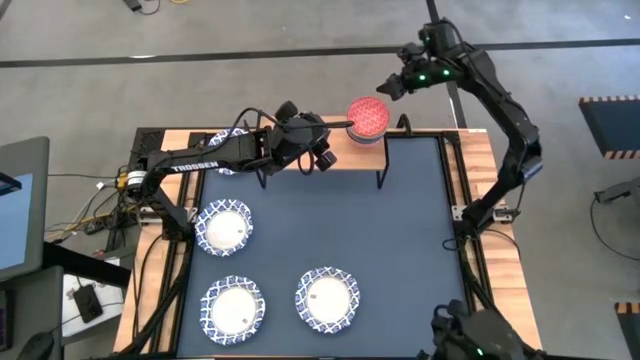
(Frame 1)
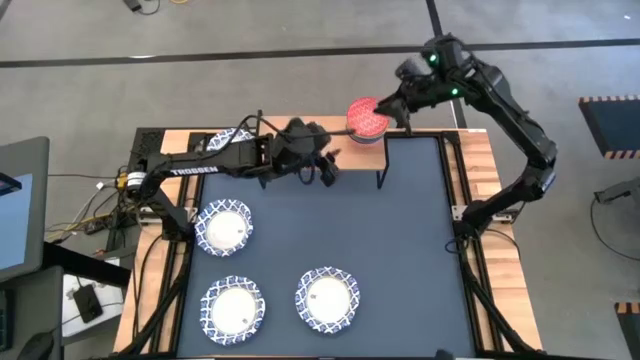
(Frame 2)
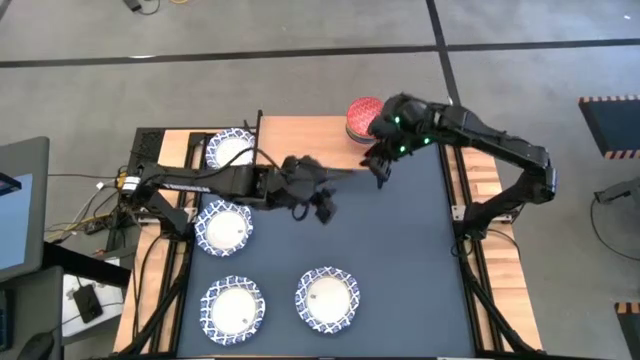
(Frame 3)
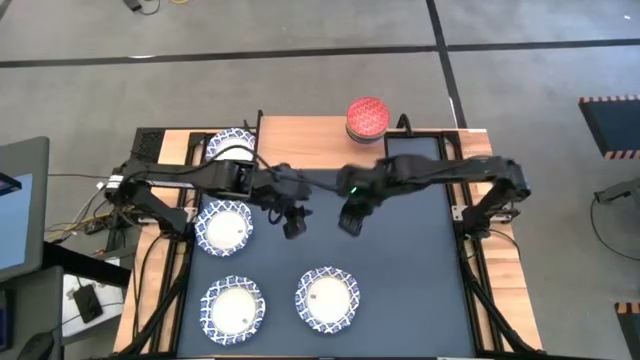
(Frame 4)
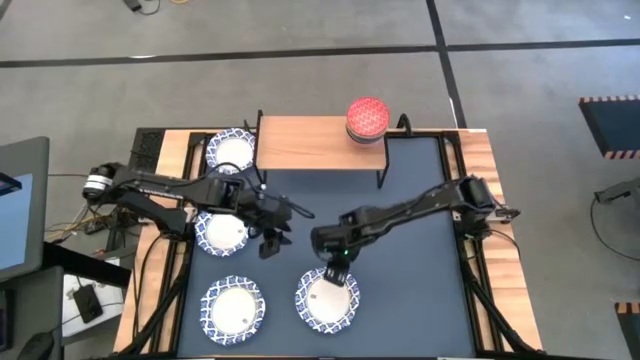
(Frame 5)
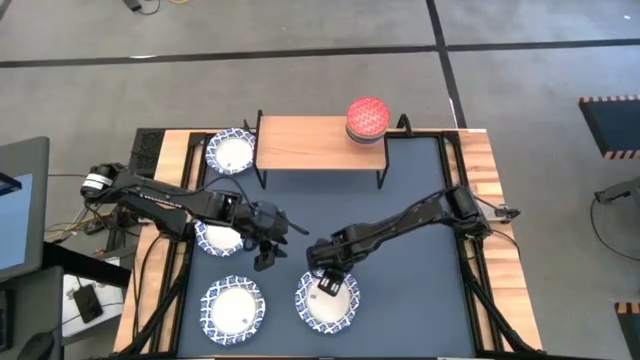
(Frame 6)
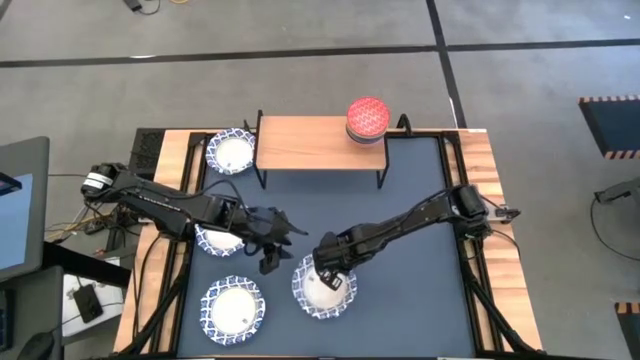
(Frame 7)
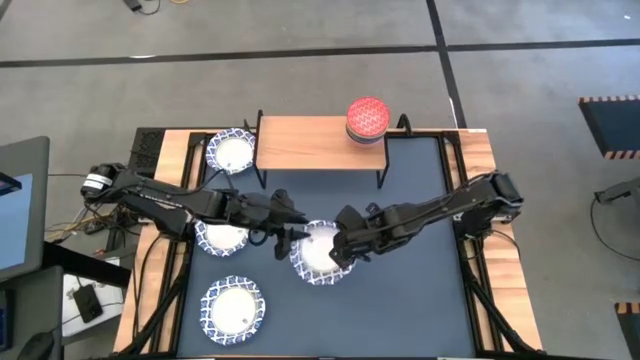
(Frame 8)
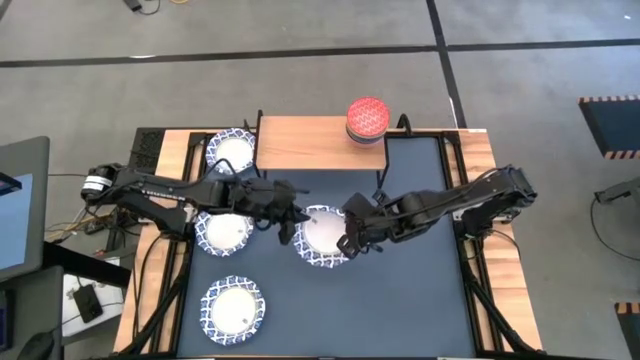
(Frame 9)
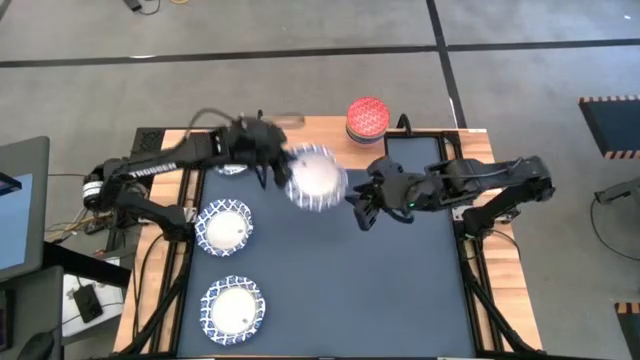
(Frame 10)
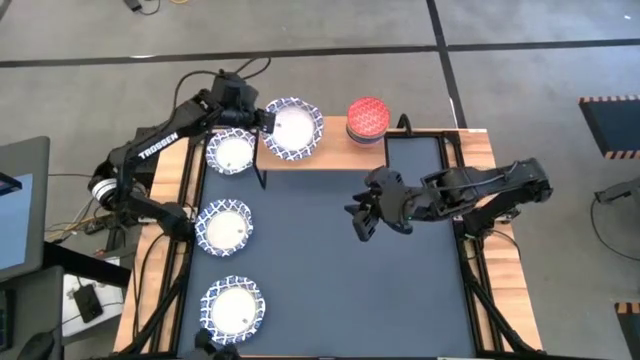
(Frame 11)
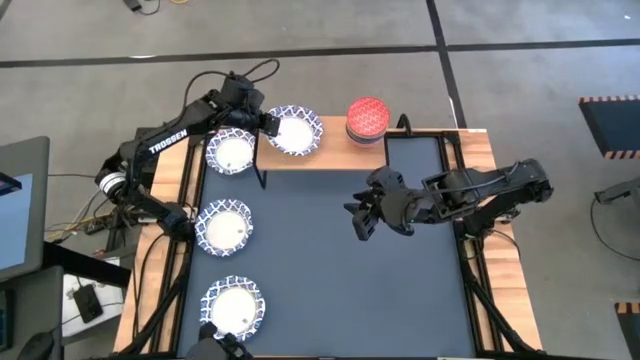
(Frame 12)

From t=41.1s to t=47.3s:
Task: Place and stack bowls onto a shelf
Put the white bowl on the shelf

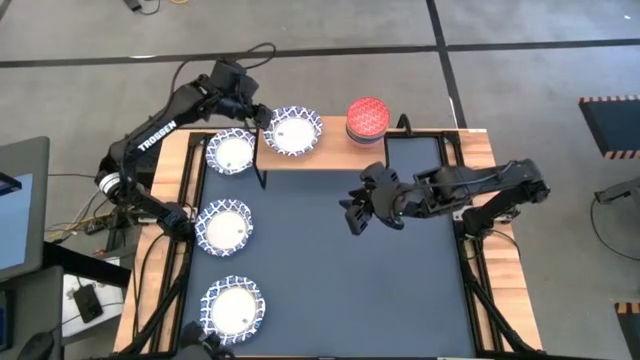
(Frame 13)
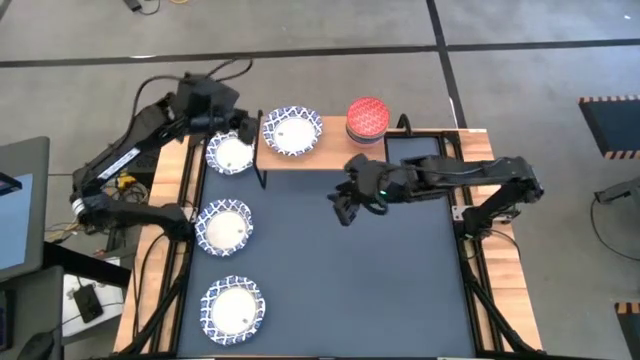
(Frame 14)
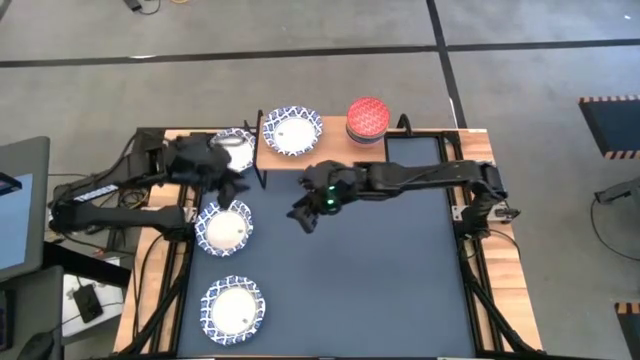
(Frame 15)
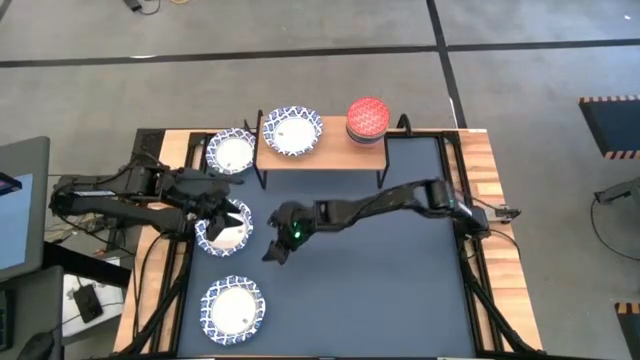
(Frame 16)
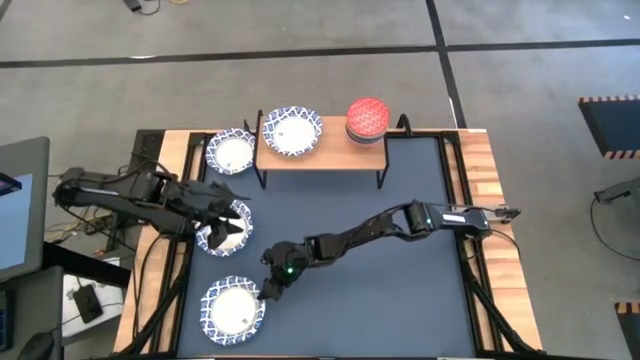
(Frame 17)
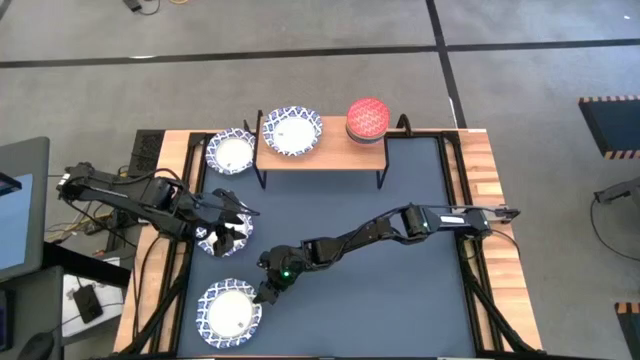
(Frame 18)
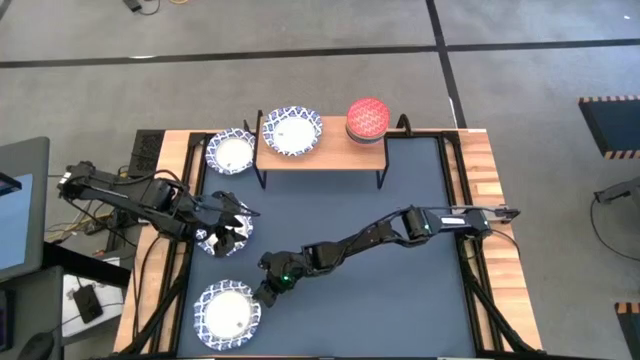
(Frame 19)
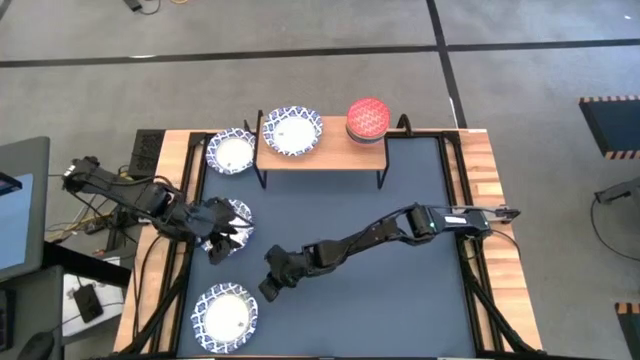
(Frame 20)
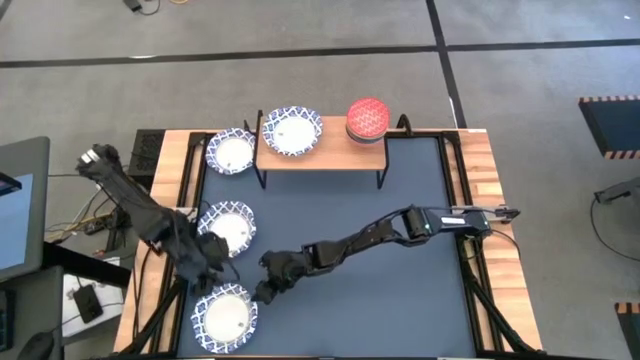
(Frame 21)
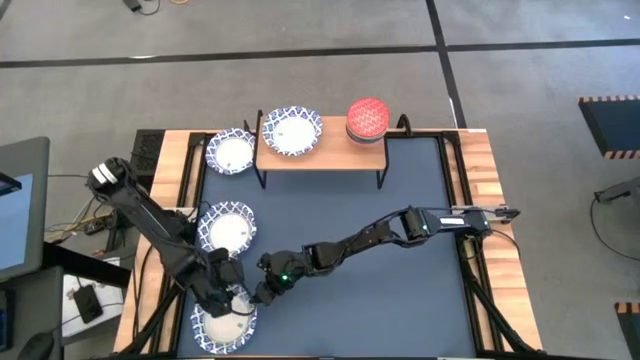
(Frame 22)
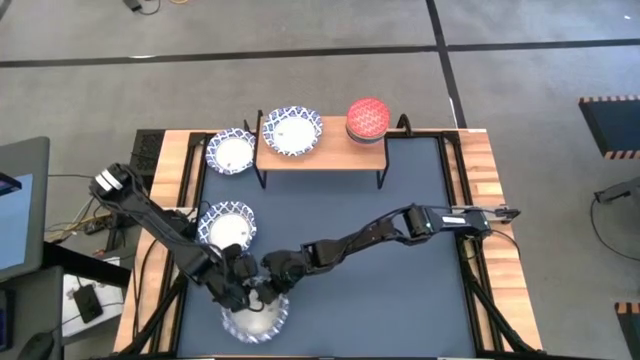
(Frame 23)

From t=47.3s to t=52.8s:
Stack the white bowl on top of the other white bowl on the shelf

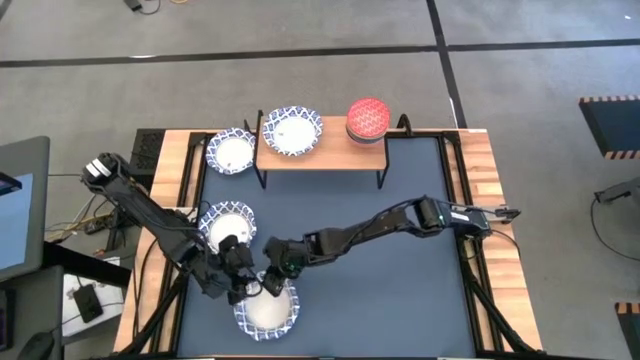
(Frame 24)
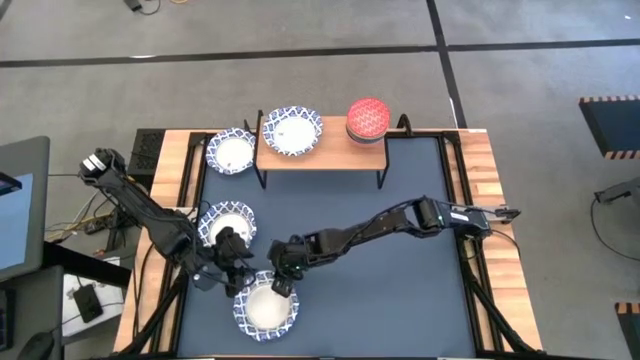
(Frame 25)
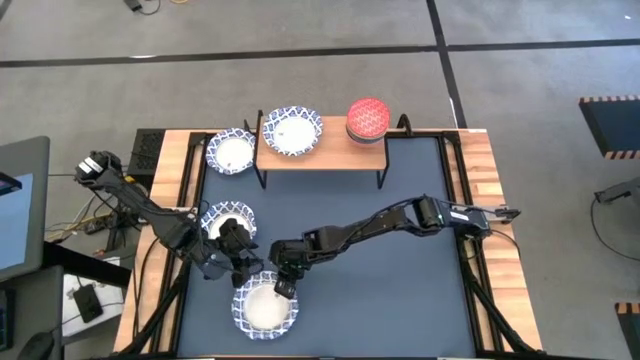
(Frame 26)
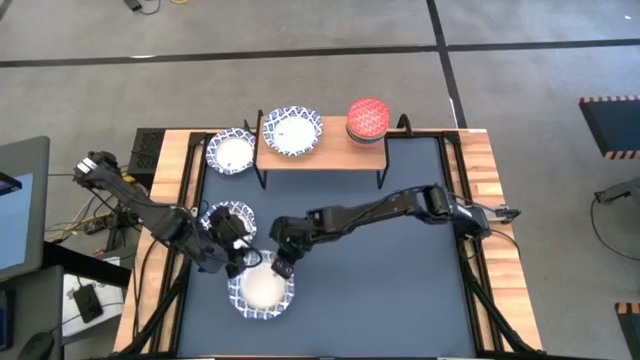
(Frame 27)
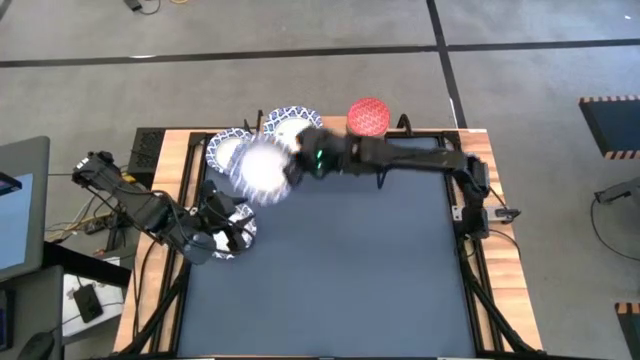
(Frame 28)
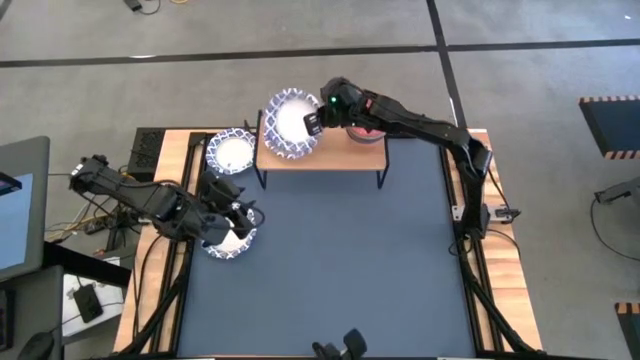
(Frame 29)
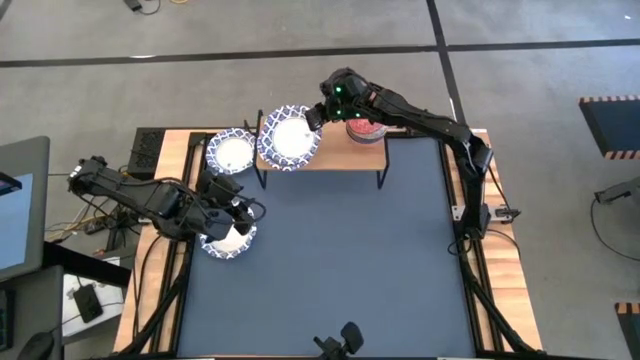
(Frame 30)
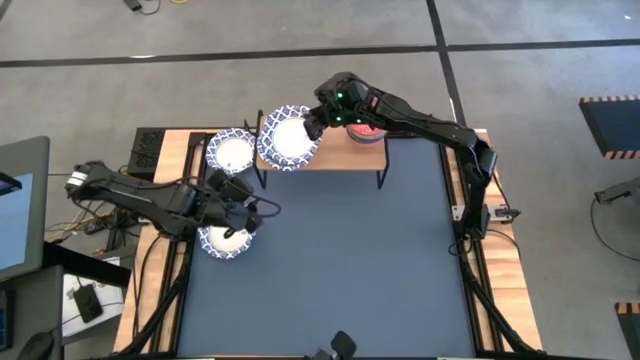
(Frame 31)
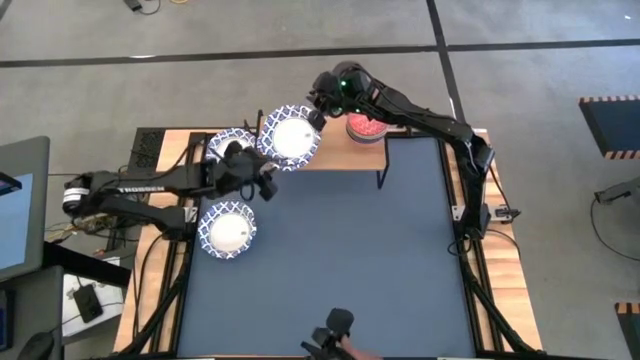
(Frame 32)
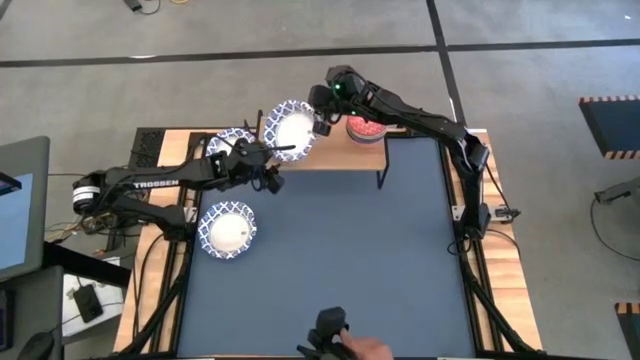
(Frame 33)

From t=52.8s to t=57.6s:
Stack the white bowl on top of the other white bowl on the shelf

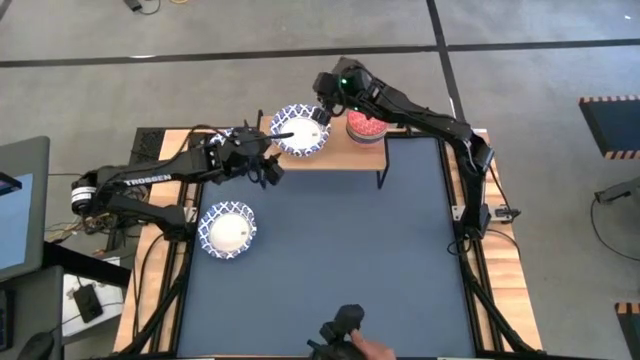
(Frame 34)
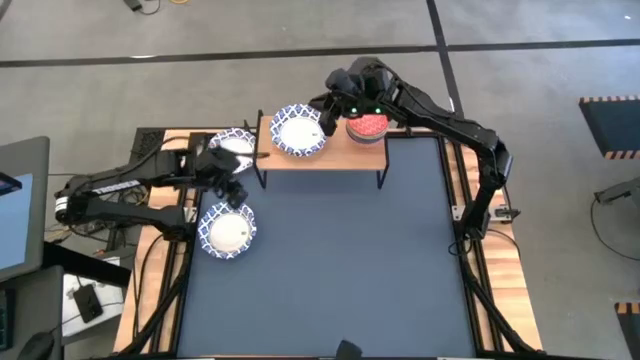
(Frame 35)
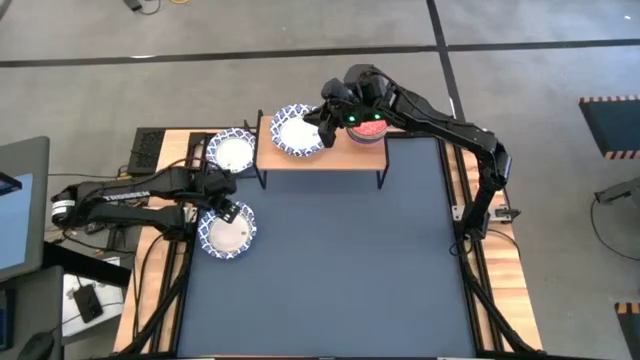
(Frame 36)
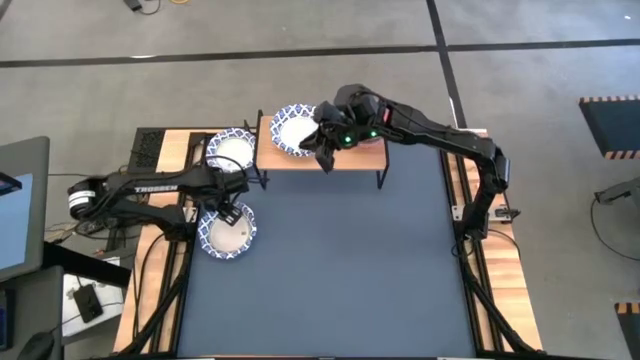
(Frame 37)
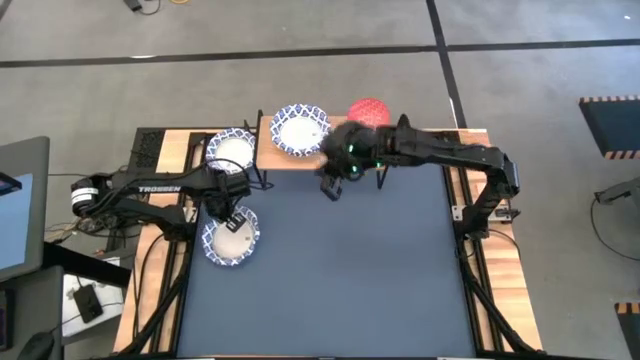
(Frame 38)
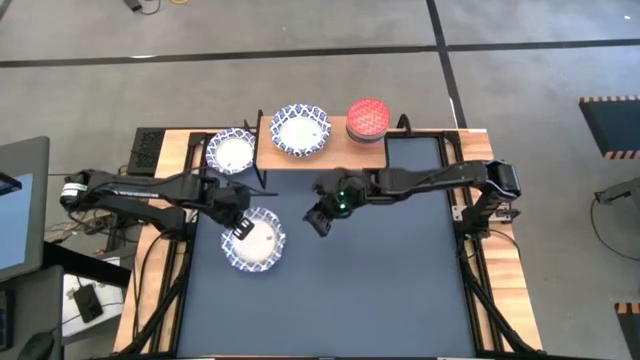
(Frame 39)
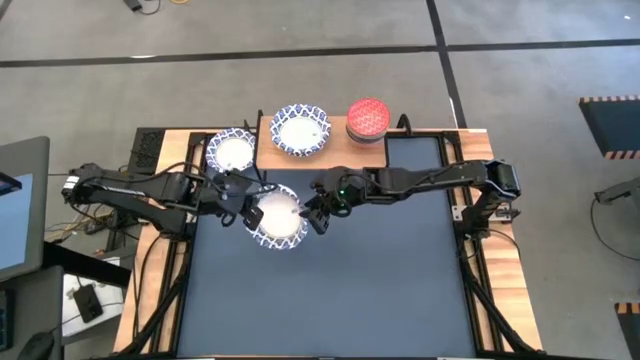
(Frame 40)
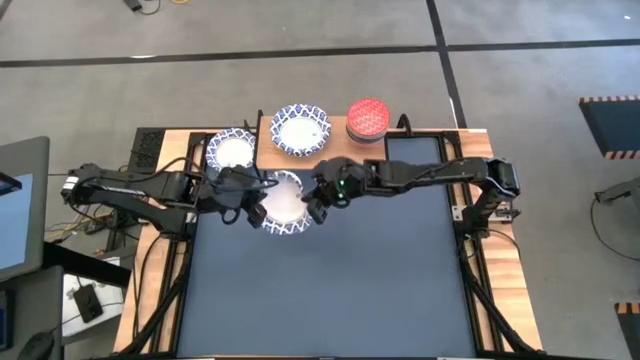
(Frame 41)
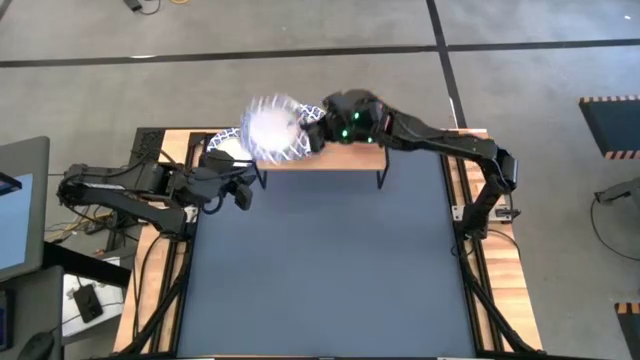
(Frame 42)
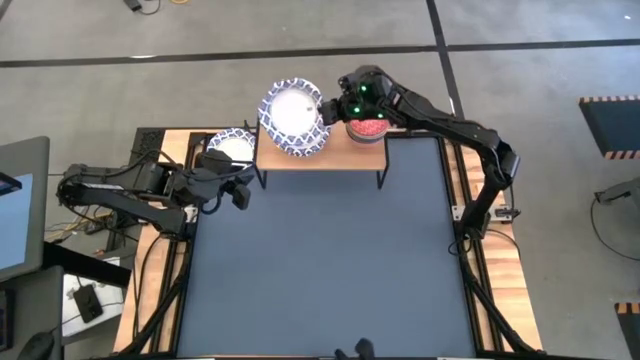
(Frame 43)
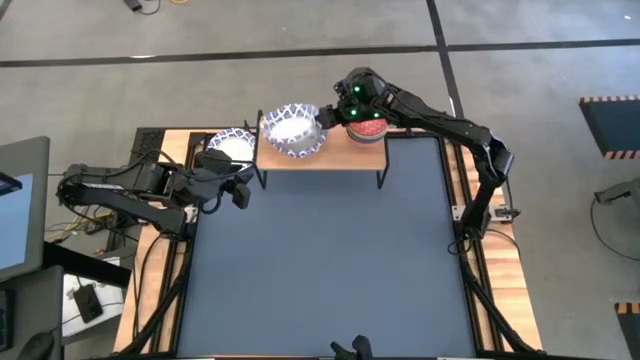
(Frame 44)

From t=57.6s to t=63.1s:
Stack the white bowl on top of the other white bowl on the shelf
